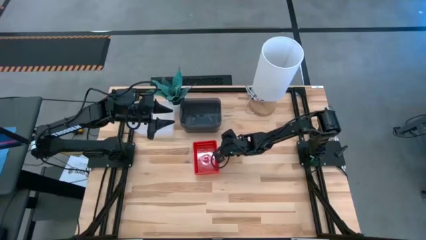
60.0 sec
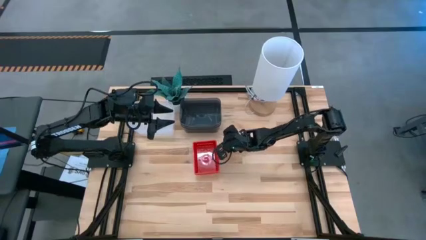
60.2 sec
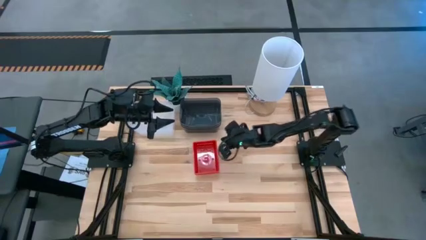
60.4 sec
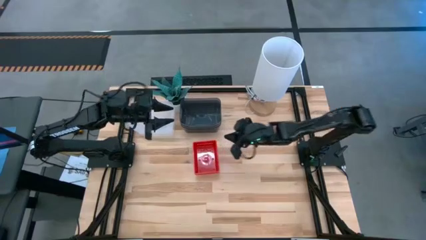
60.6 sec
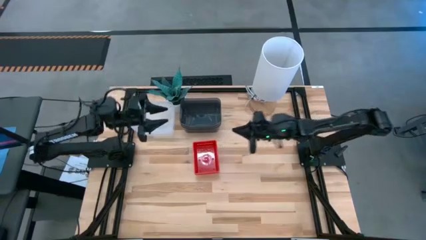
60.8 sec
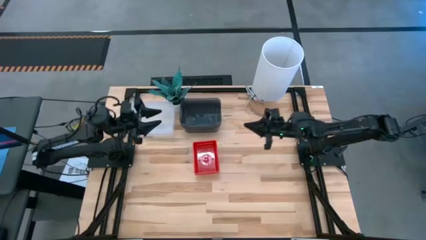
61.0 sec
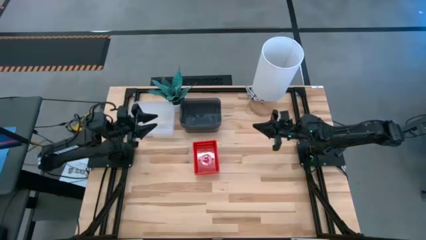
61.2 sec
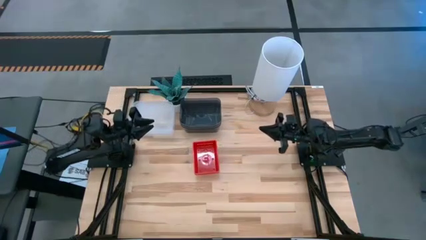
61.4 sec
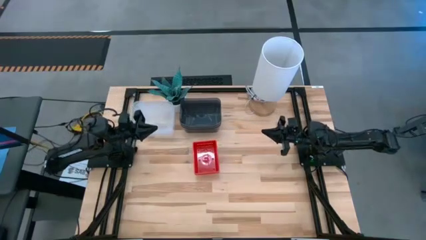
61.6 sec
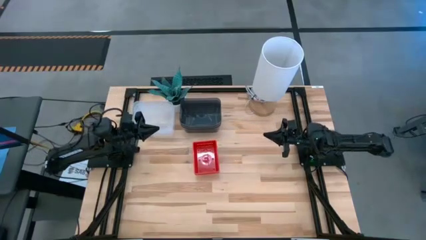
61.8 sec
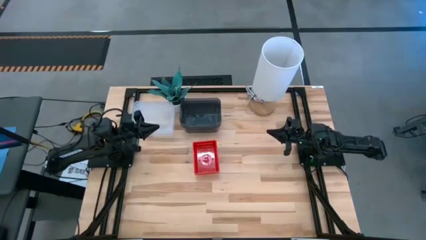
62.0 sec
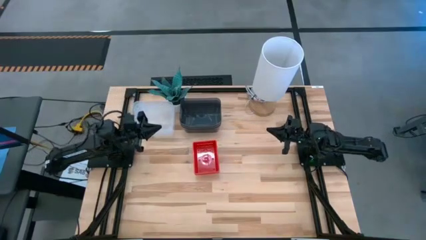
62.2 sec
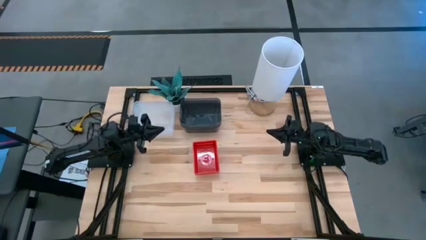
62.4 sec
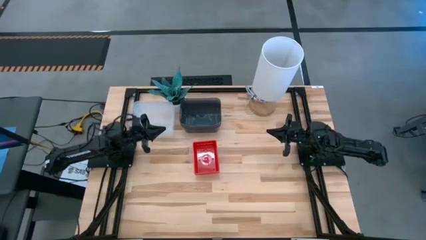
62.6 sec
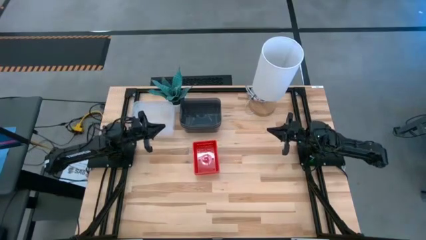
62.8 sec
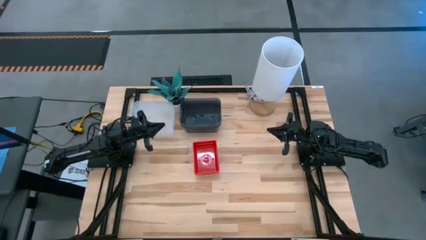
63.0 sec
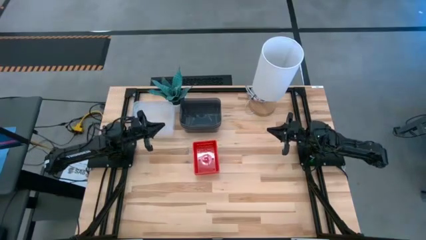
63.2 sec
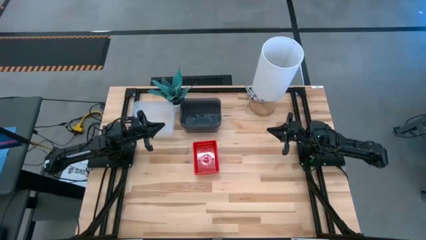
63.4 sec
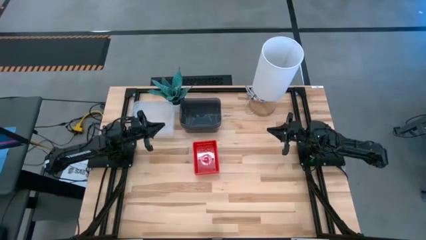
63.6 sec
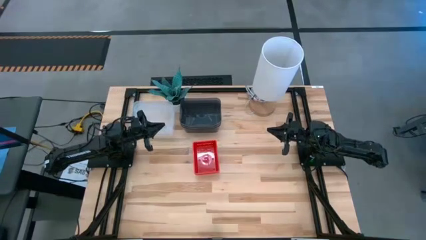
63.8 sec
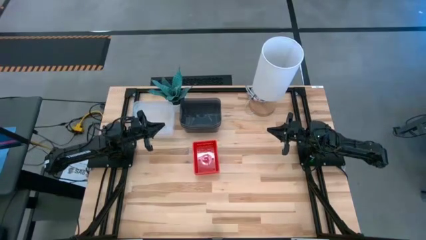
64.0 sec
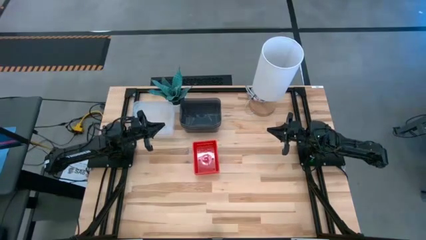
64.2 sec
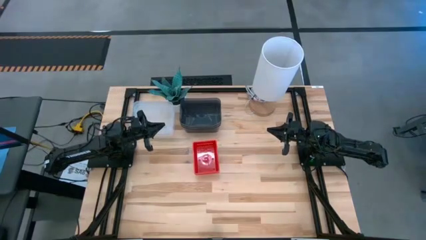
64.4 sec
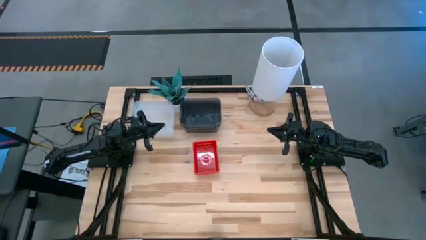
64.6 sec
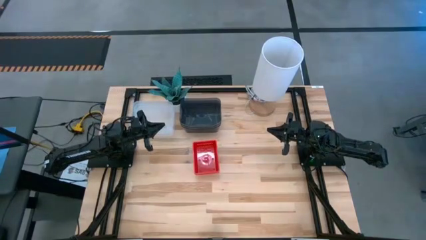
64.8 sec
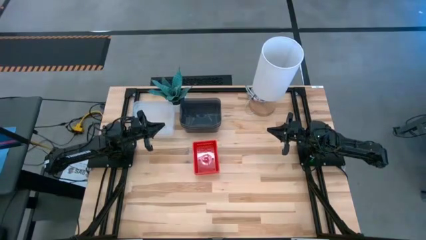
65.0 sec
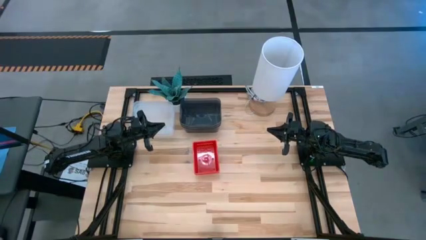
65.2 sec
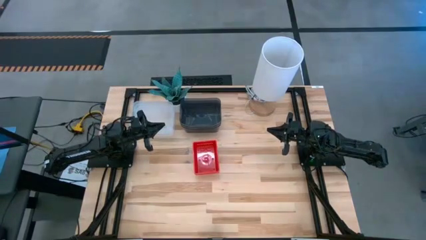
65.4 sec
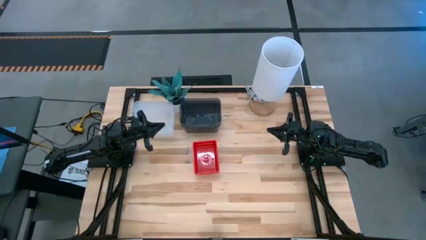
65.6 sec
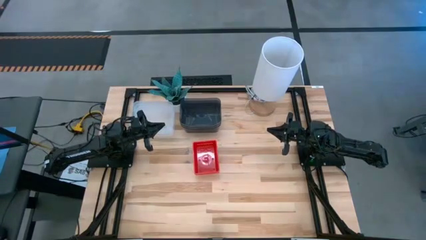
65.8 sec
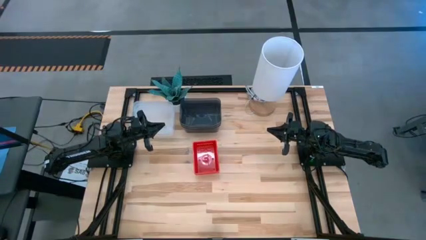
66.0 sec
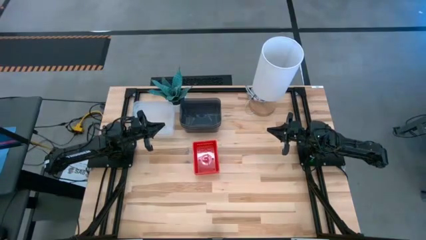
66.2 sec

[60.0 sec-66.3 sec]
Return to Home Position
